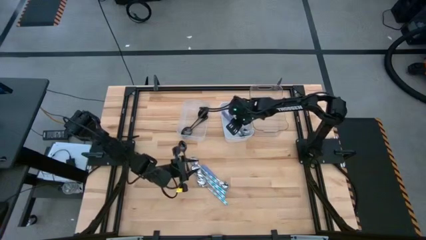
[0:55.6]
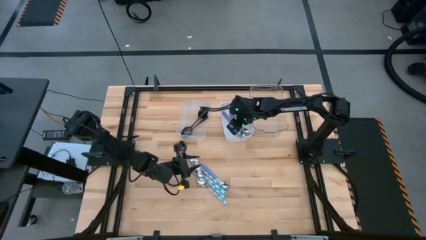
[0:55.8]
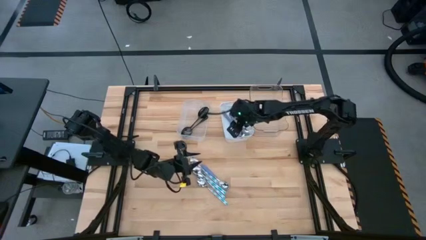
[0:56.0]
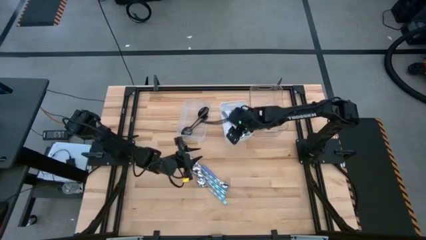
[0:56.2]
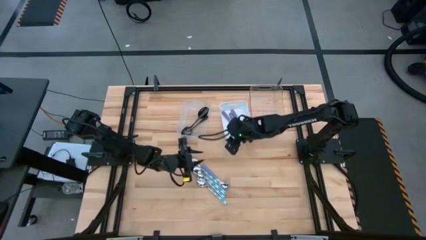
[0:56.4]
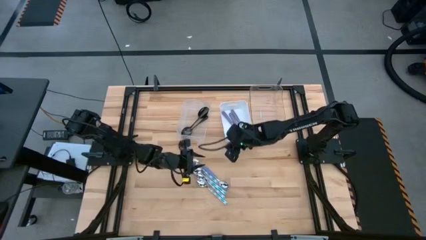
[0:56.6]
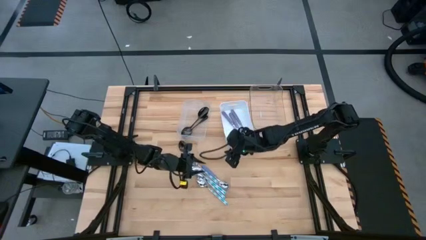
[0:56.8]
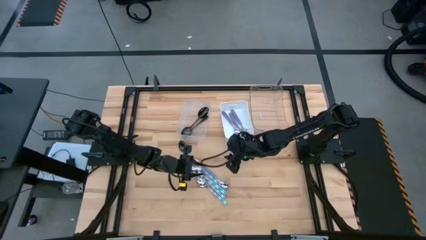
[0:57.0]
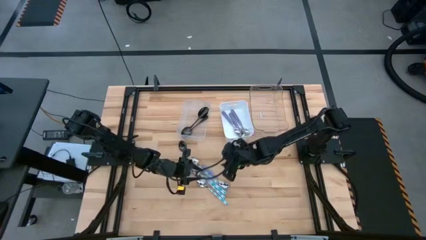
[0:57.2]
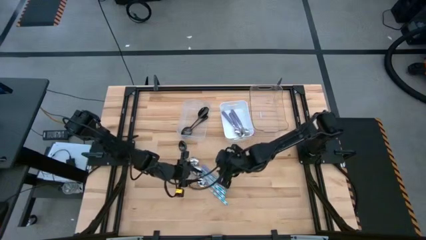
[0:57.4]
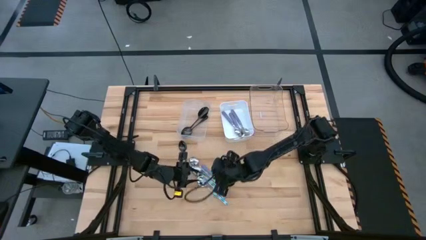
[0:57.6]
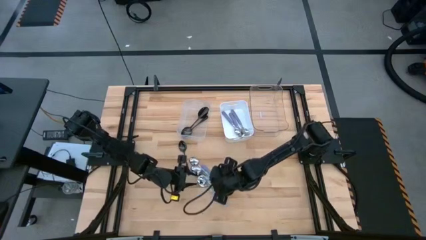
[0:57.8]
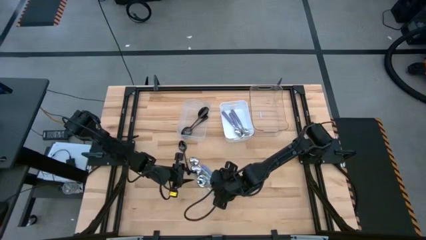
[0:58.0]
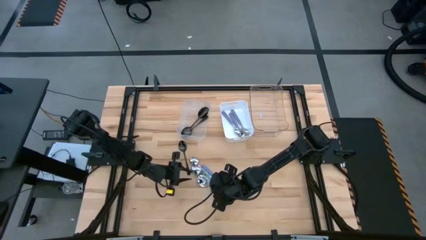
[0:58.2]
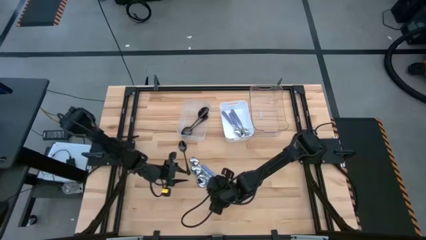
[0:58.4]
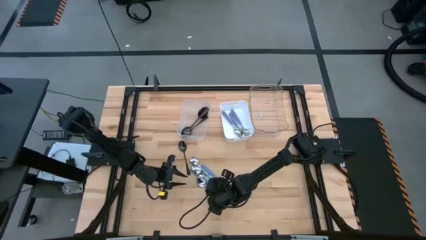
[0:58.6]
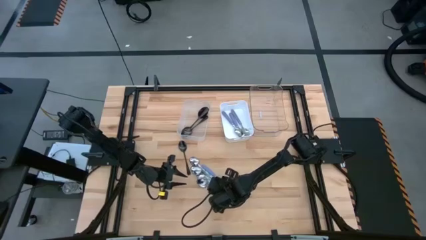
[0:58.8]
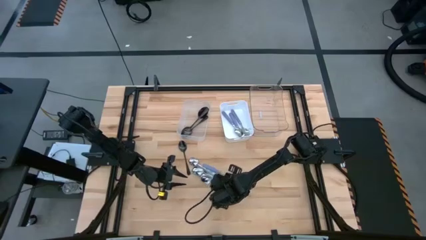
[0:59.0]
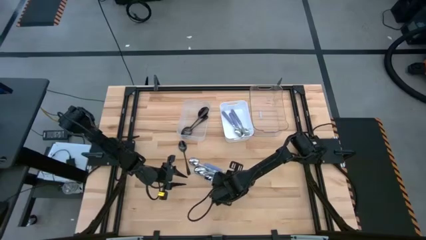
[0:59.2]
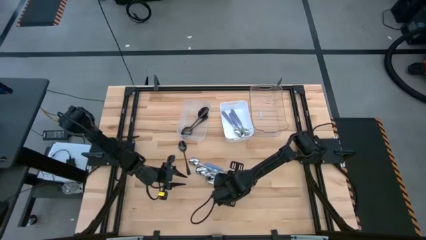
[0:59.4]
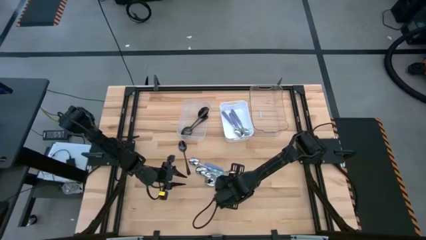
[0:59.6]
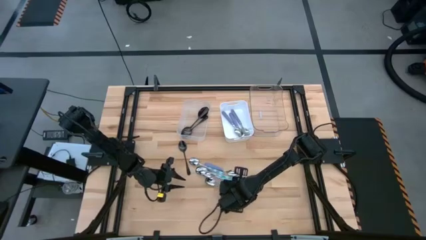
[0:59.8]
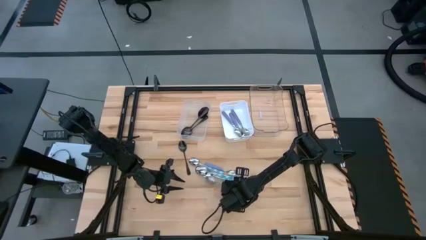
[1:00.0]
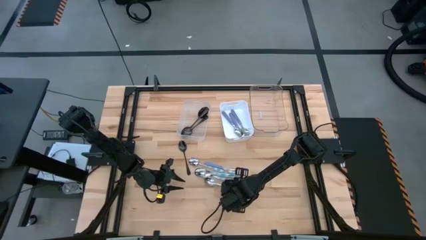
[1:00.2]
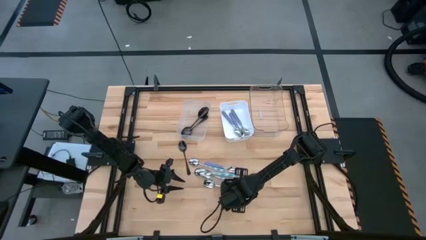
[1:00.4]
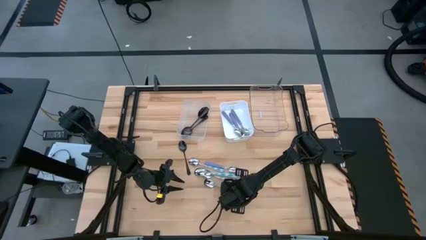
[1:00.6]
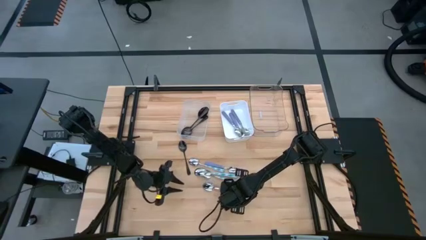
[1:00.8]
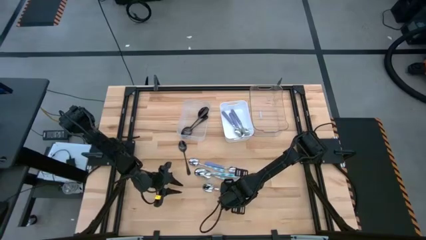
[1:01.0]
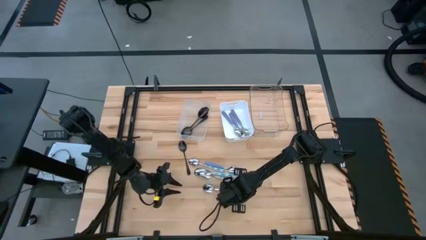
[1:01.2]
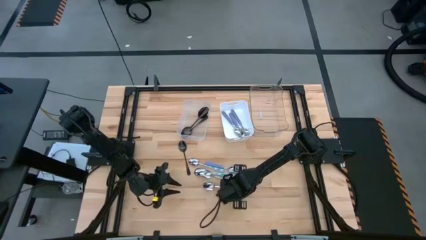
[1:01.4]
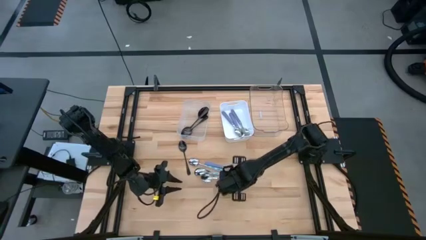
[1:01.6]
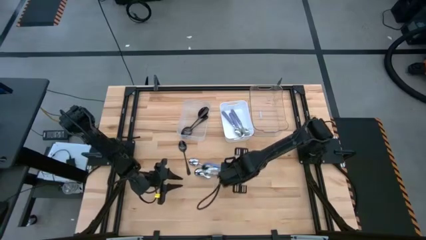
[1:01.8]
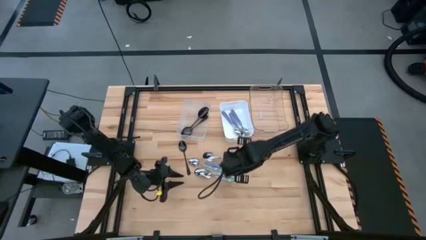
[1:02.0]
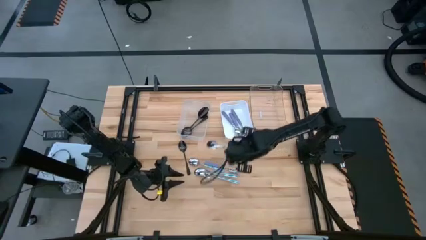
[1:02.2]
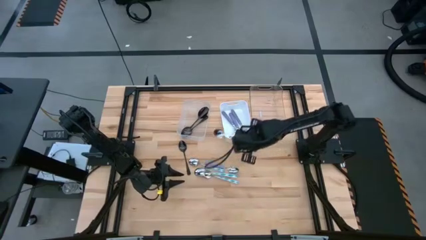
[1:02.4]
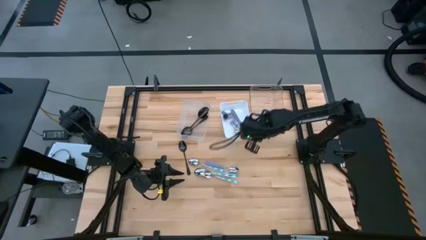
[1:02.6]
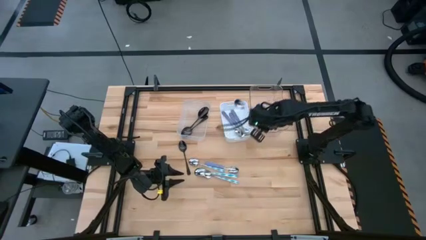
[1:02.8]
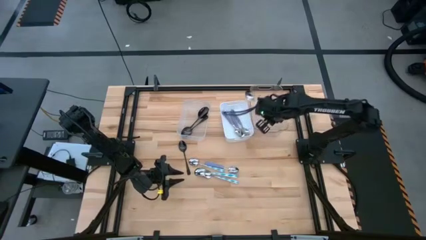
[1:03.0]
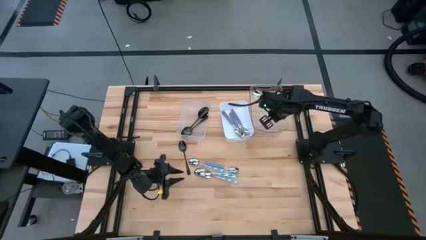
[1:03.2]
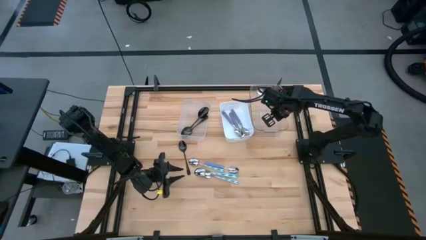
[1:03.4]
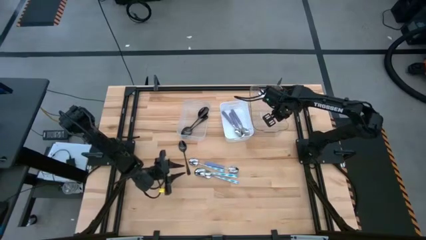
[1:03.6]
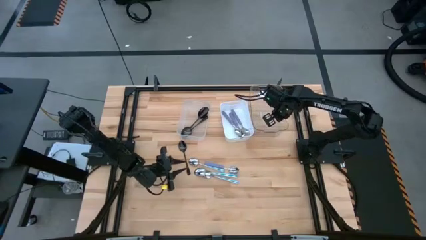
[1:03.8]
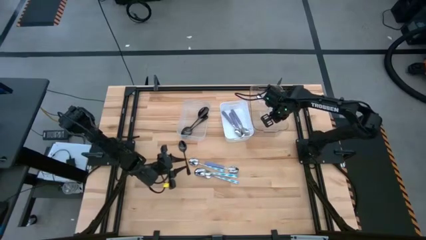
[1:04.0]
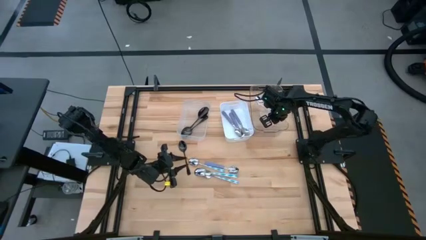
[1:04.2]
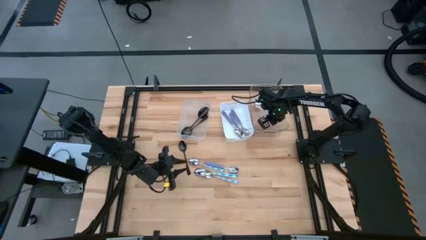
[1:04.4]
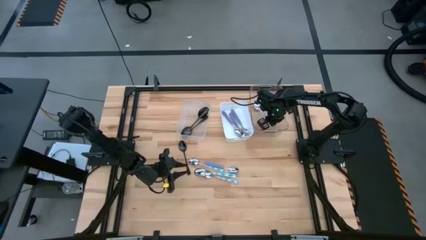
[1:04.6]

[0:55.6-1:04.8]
Task: Sort silverware by color (type)
Put the blue spoon into the right transparent bin

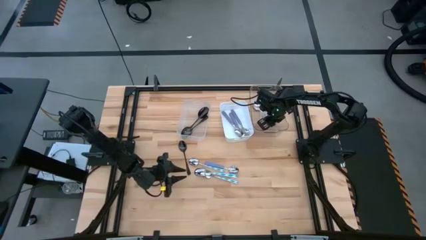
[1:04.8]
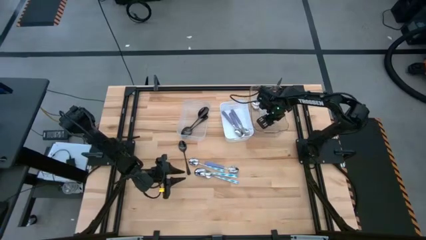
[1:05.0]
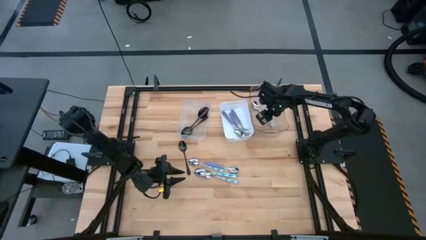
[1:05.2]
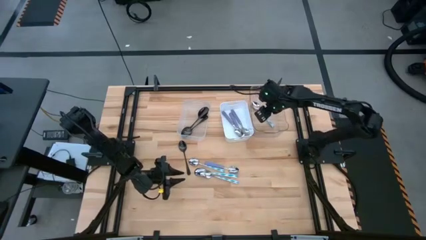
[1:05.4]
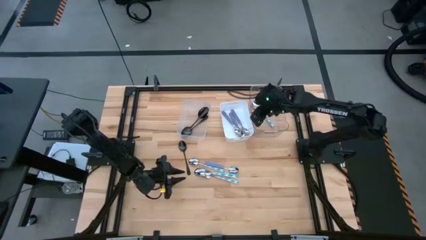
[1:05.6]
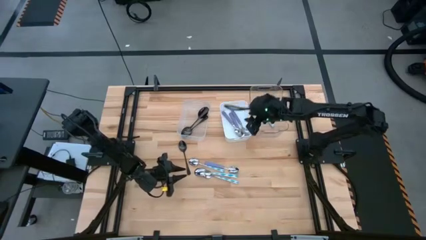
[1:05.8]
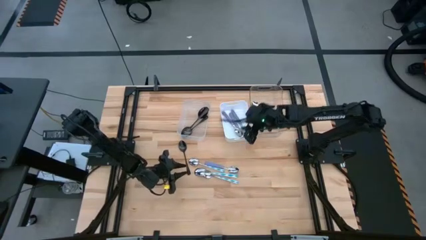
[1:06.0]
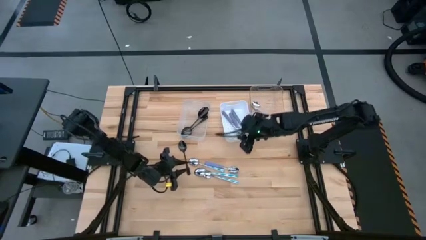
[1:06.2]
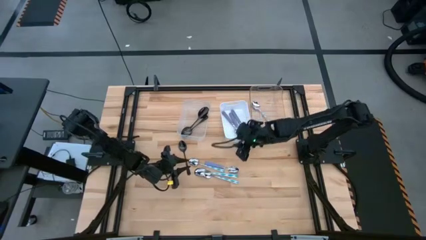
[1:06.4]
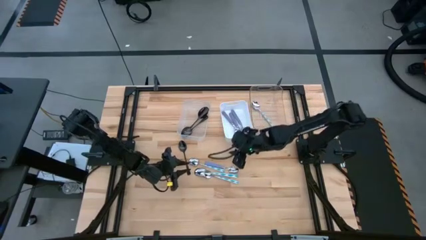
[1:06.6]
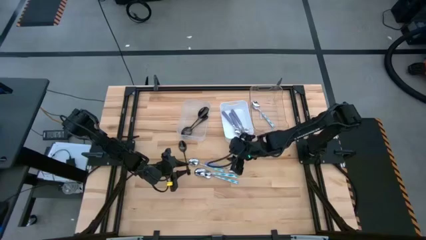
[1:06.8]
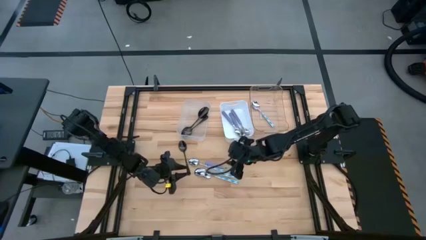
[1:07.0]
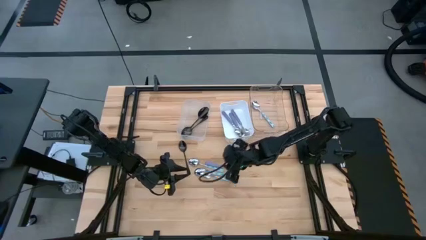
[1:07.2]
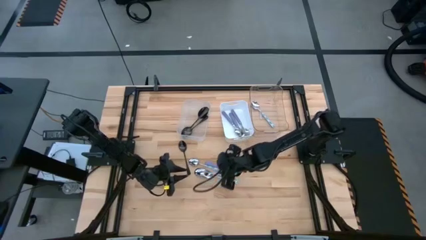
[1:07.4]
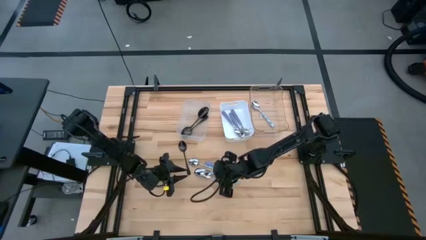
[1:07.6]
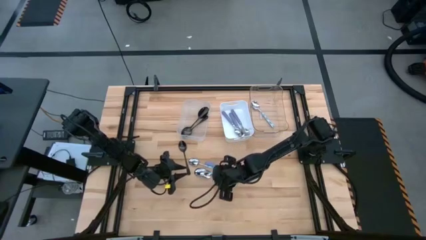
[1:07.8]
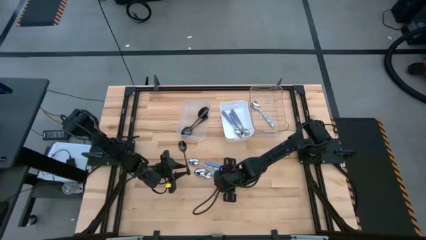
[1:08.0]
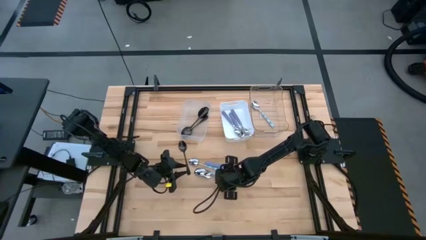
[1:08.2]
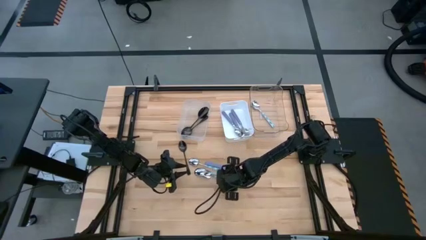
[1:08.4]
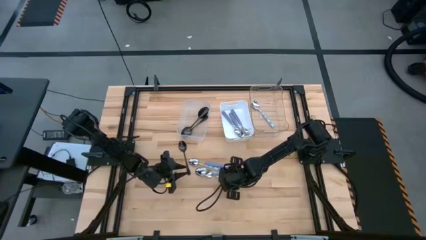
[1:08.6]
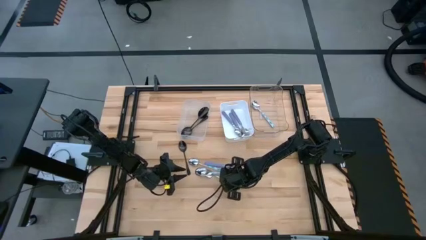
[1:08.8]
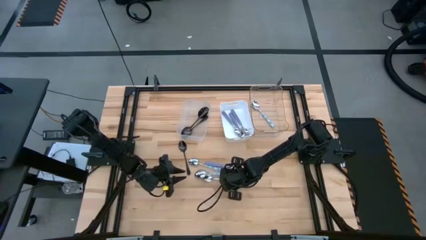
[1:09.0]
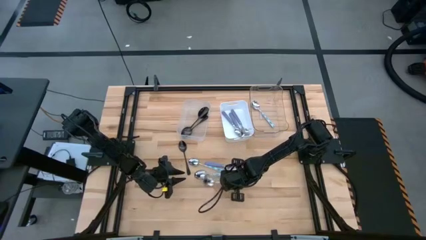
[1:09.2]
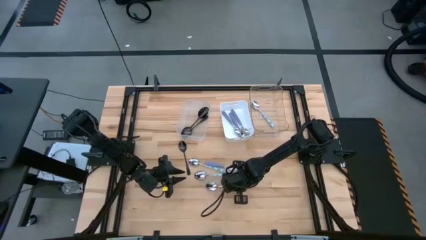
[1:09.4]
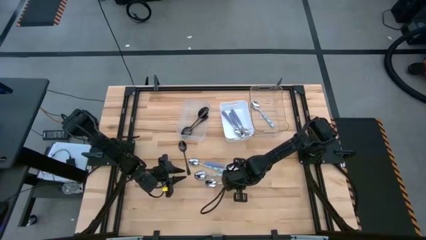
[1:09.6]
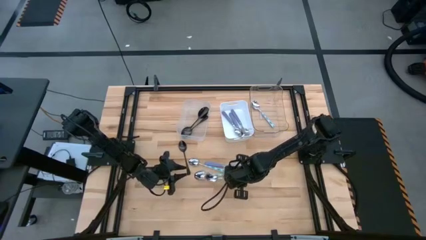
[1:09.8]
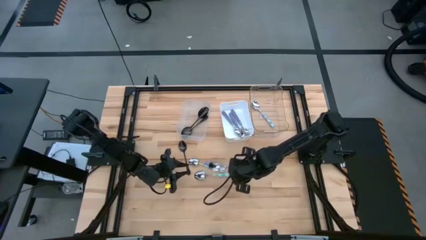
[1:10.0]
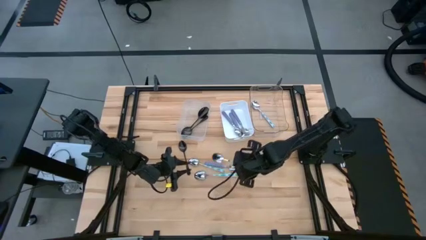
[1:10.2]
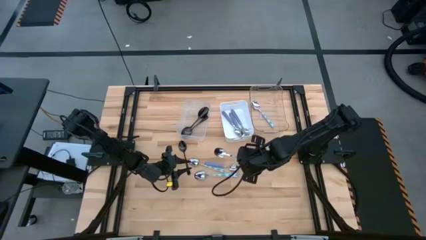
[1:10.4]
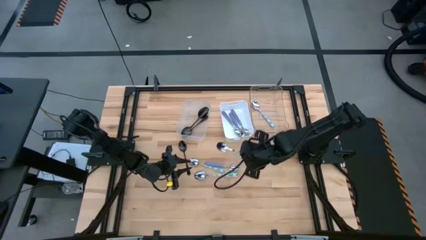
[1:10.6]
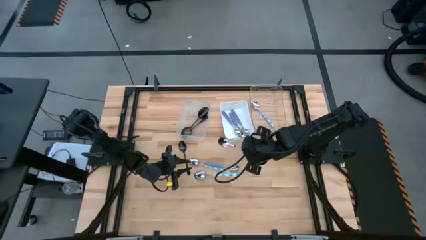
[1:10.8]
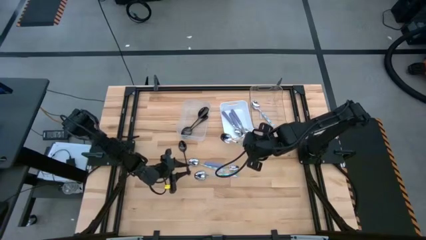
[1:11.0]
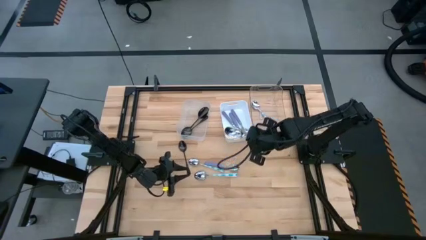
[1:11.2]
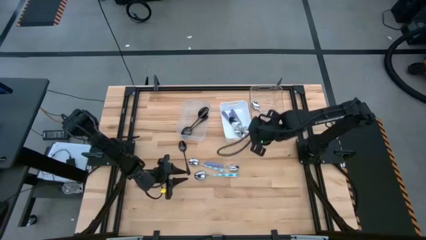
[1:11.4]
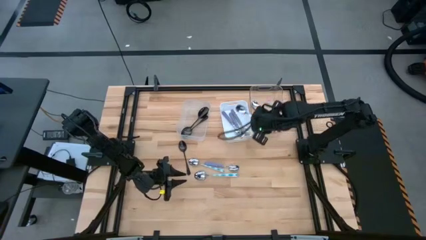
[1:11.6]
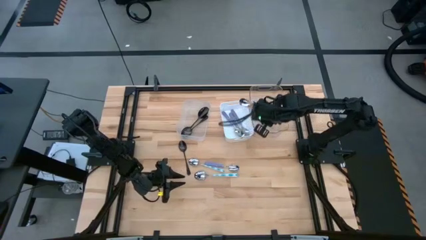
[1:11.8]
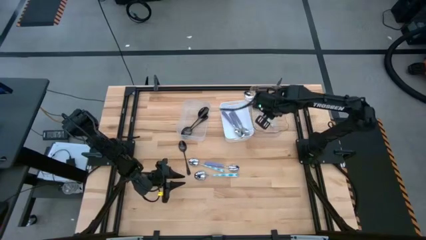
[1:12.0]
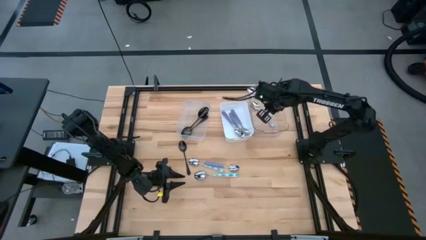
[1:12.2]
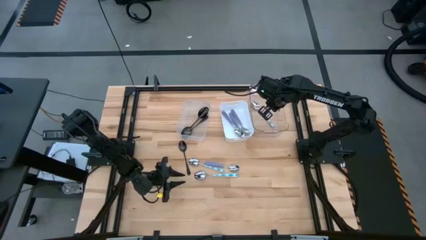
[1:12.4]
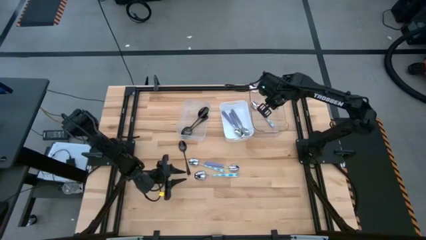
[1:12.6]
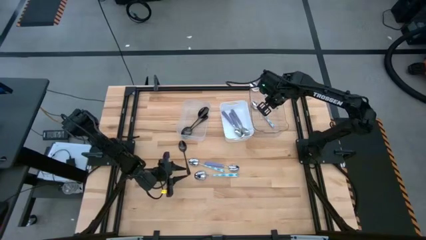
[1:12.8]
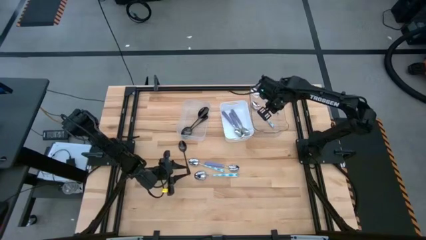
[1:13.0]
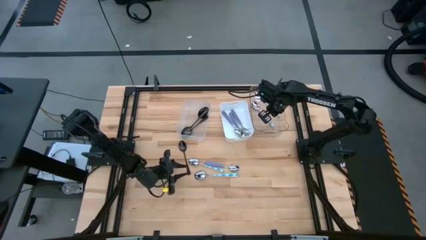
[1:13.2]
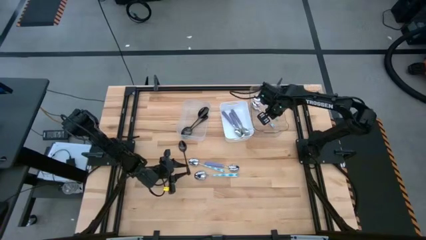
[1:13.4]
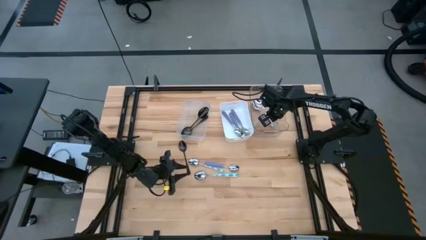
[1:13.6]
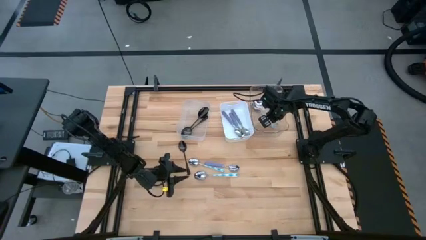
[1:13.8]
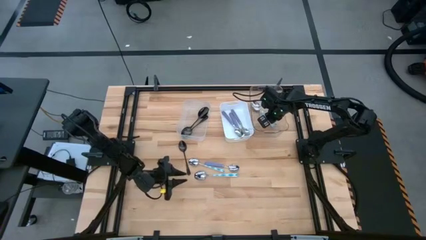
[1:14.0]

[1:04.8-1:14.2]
Put the blue spoon into the right transparent bin
